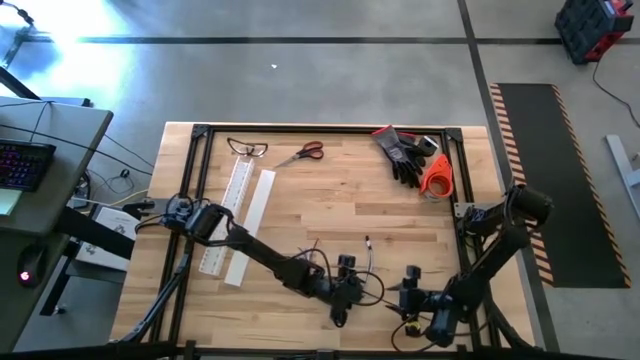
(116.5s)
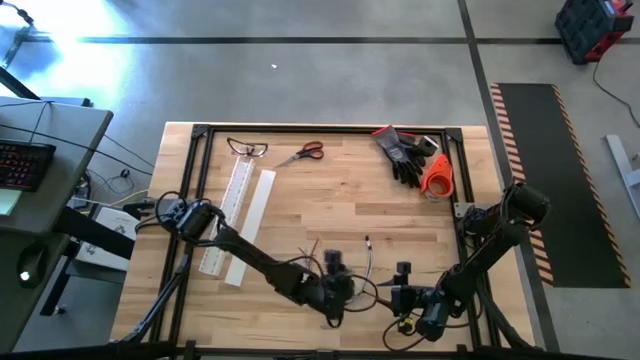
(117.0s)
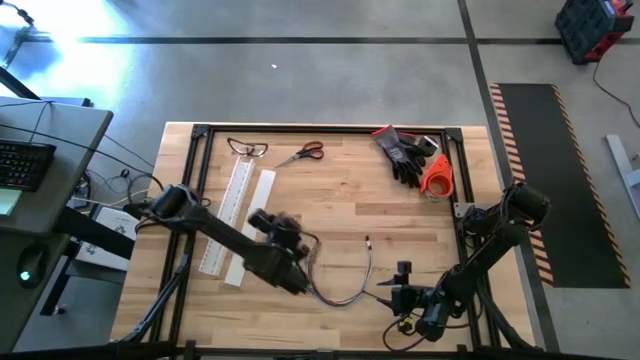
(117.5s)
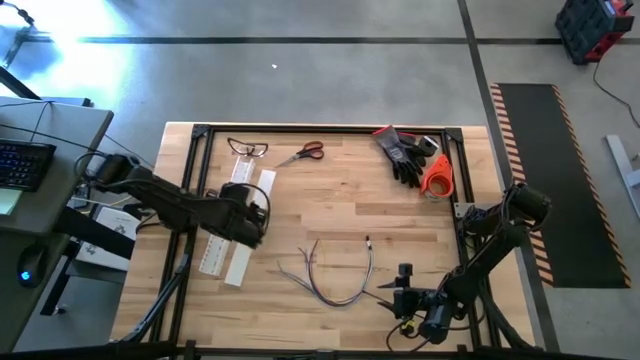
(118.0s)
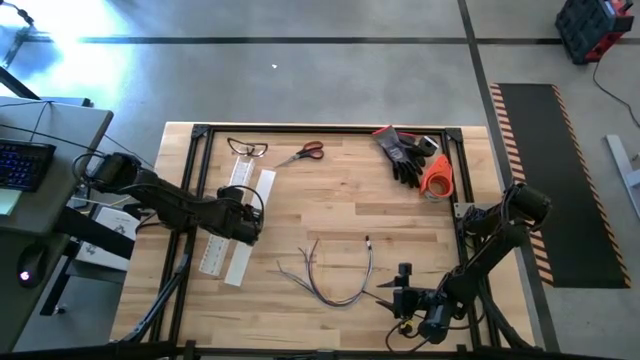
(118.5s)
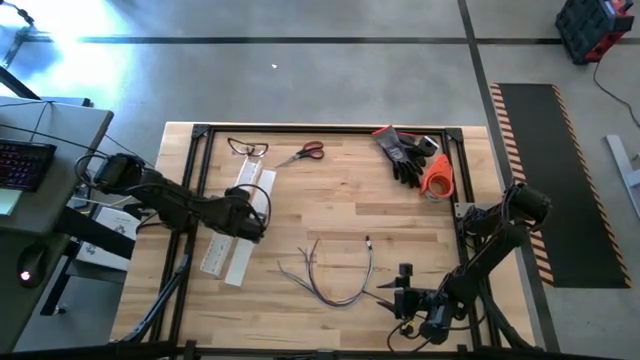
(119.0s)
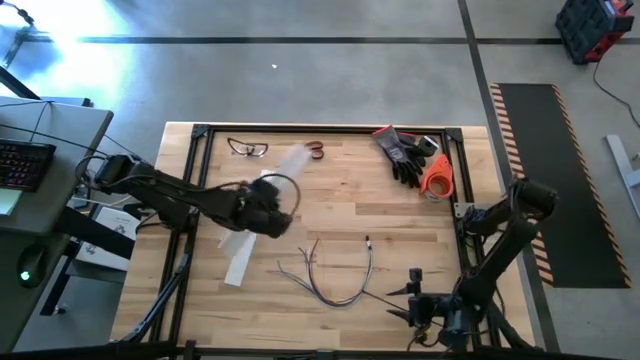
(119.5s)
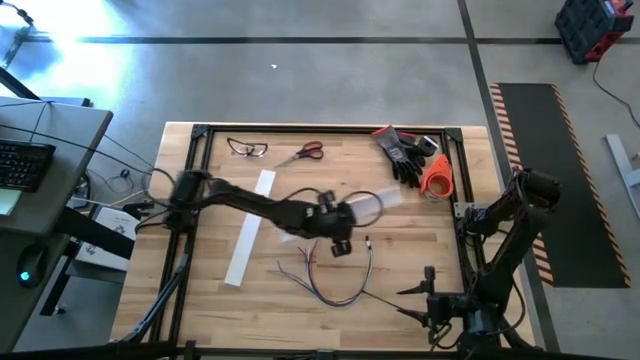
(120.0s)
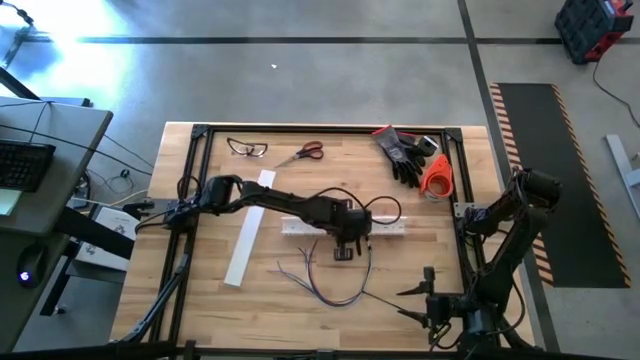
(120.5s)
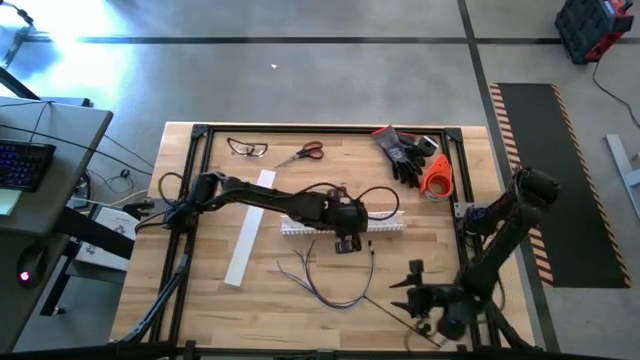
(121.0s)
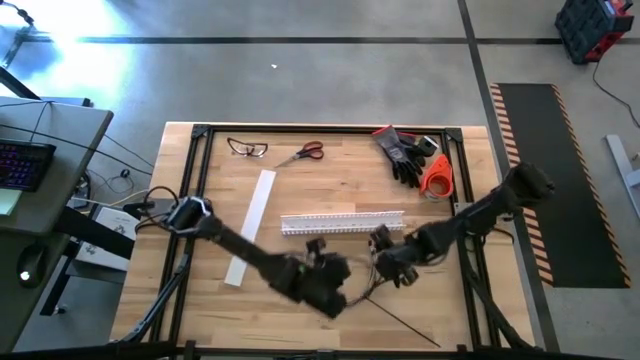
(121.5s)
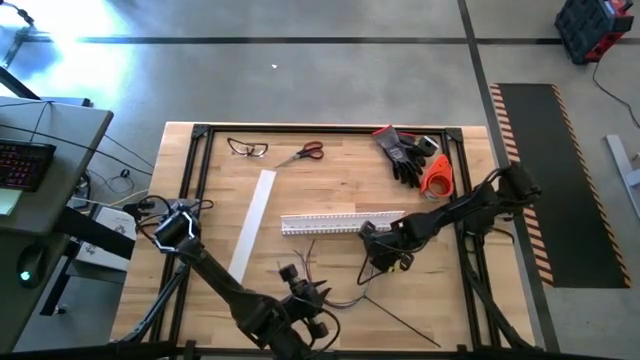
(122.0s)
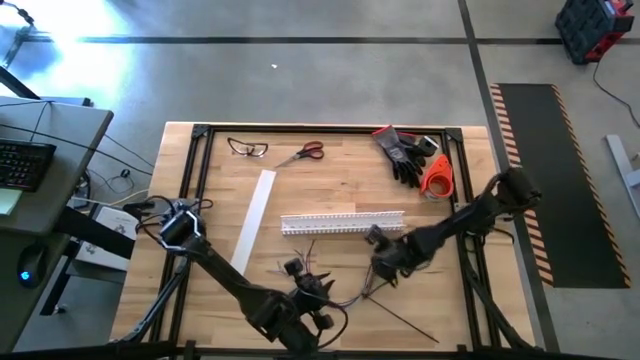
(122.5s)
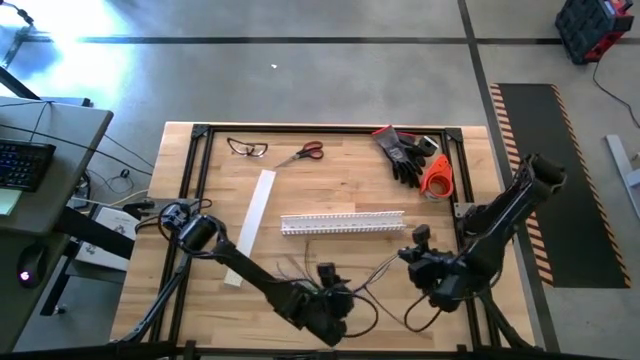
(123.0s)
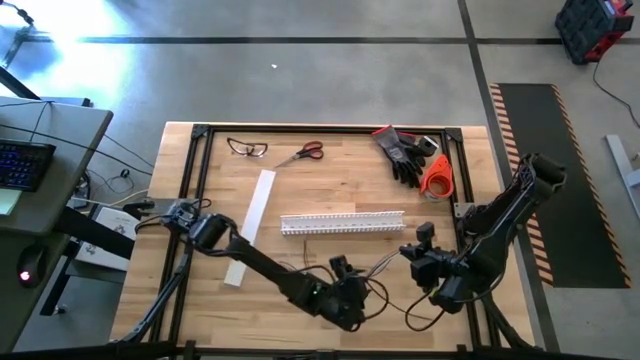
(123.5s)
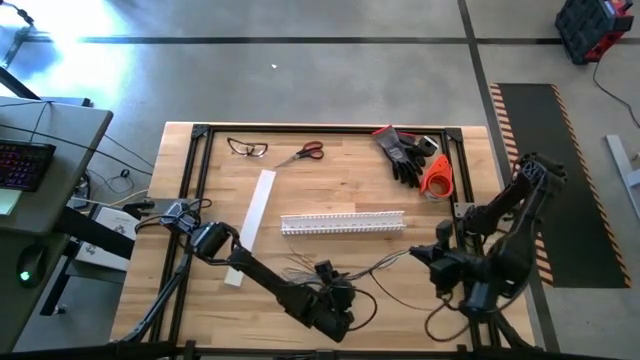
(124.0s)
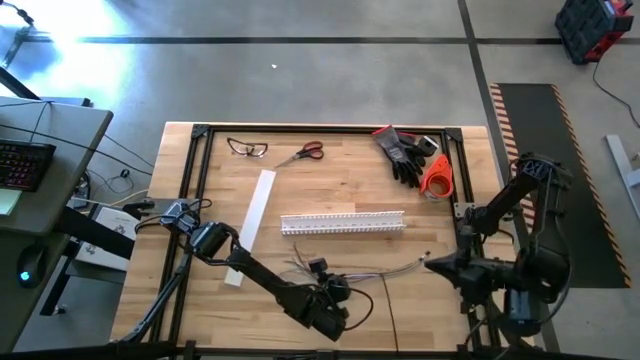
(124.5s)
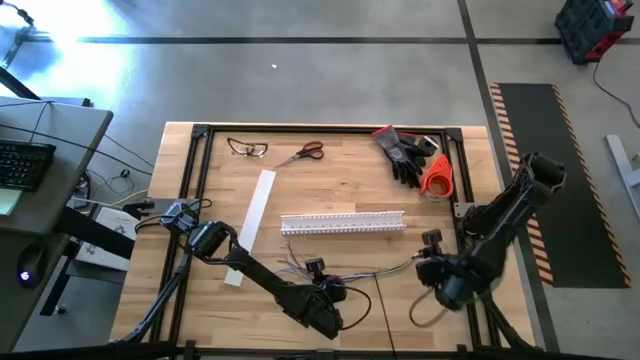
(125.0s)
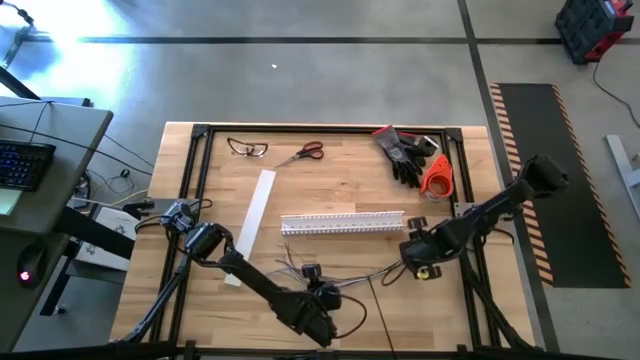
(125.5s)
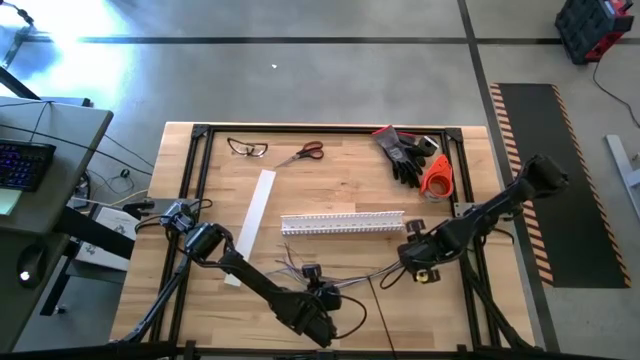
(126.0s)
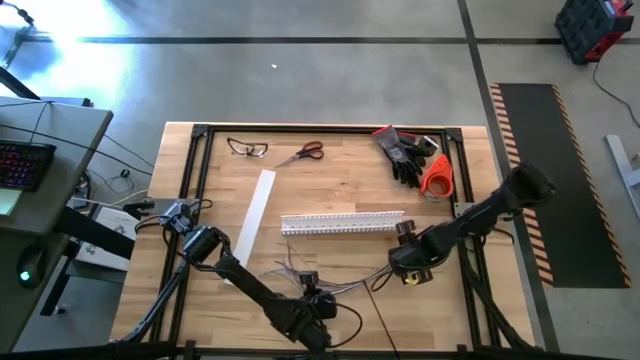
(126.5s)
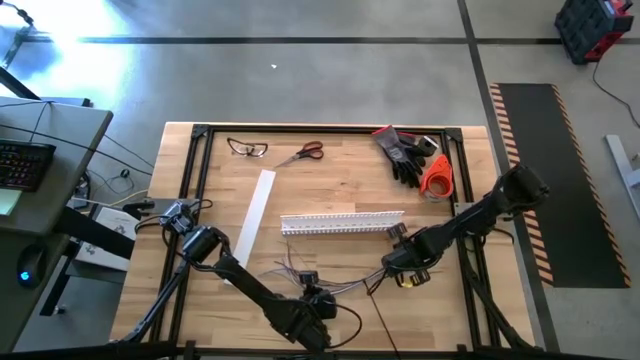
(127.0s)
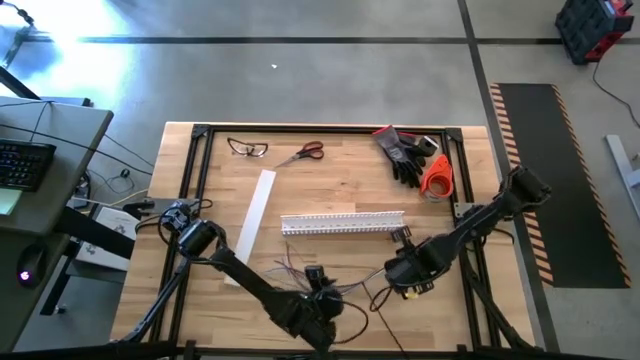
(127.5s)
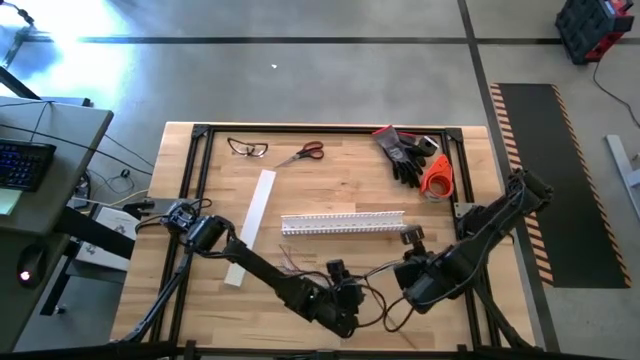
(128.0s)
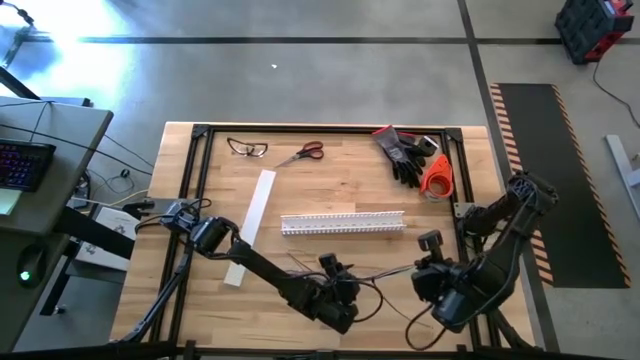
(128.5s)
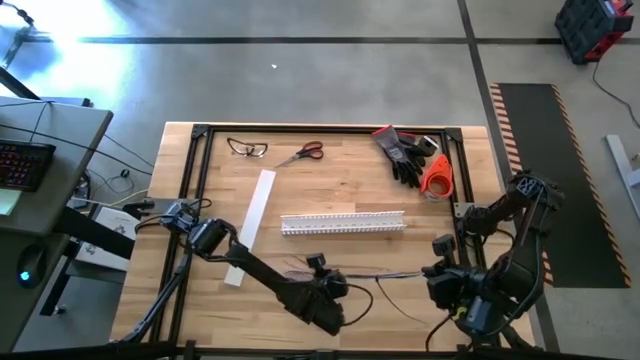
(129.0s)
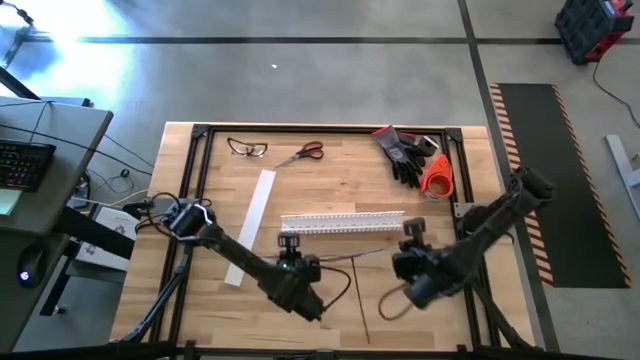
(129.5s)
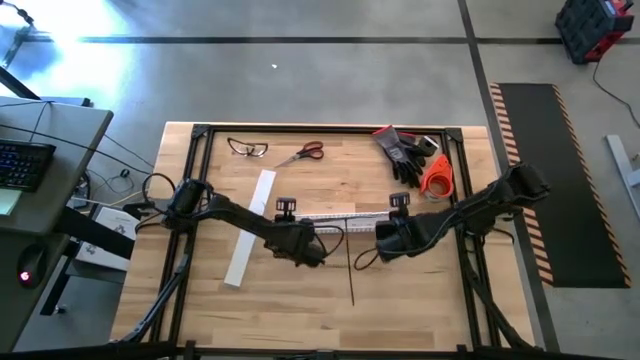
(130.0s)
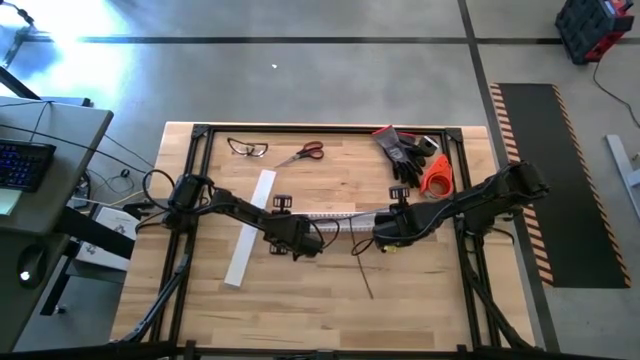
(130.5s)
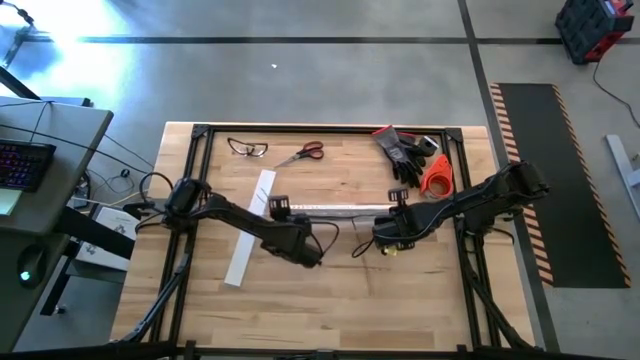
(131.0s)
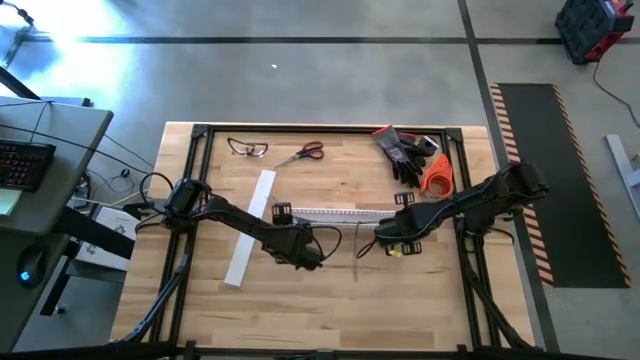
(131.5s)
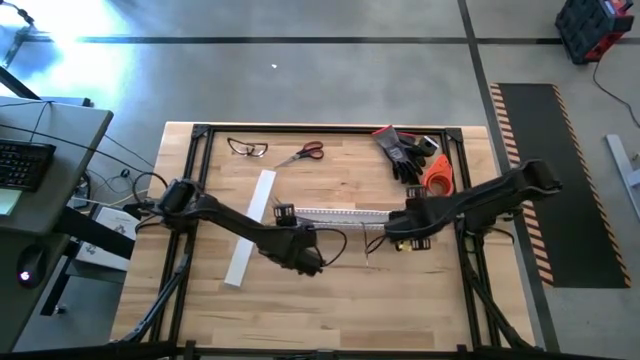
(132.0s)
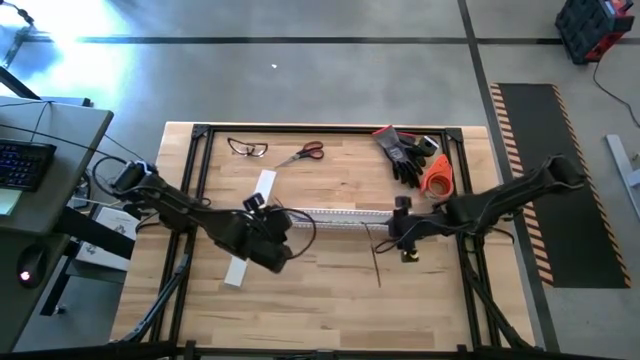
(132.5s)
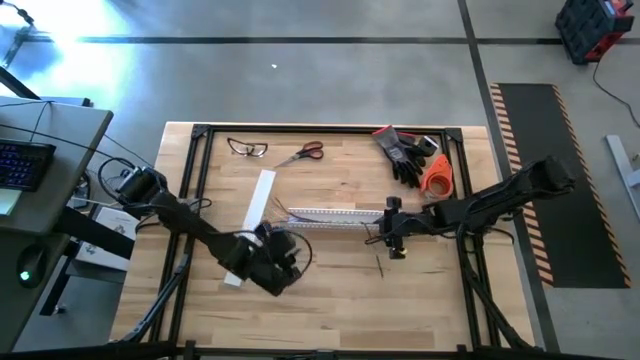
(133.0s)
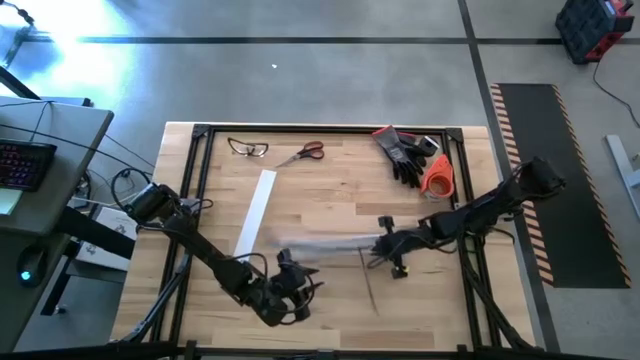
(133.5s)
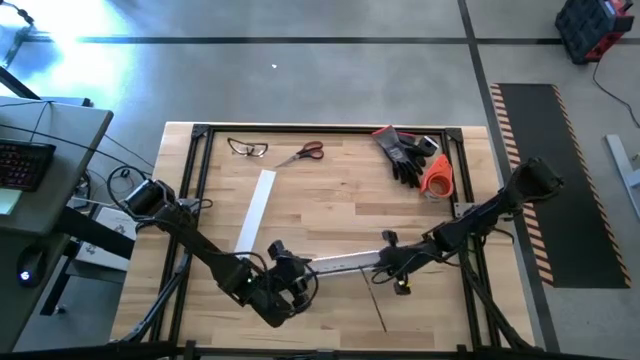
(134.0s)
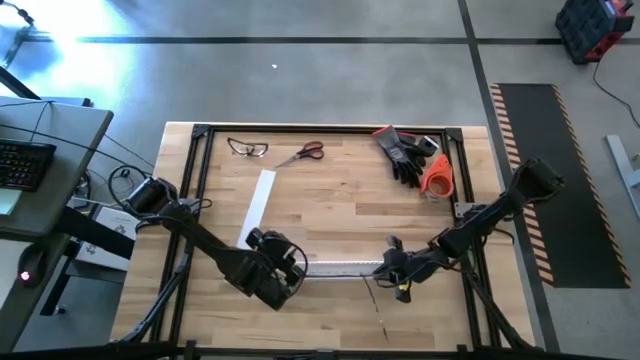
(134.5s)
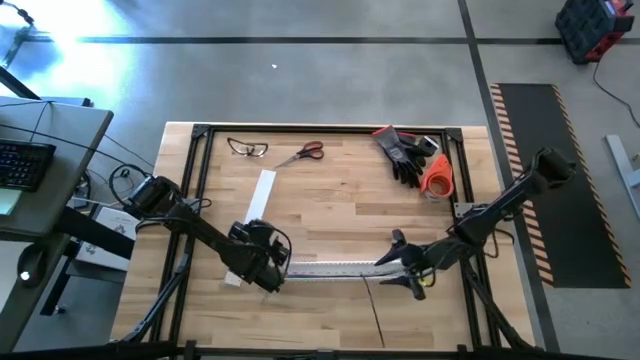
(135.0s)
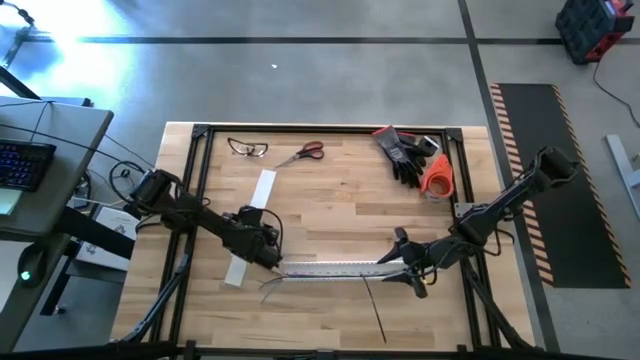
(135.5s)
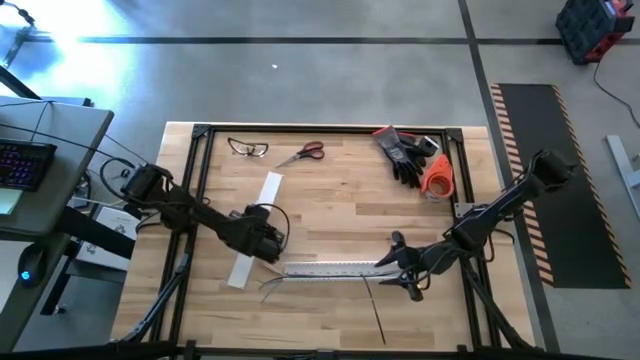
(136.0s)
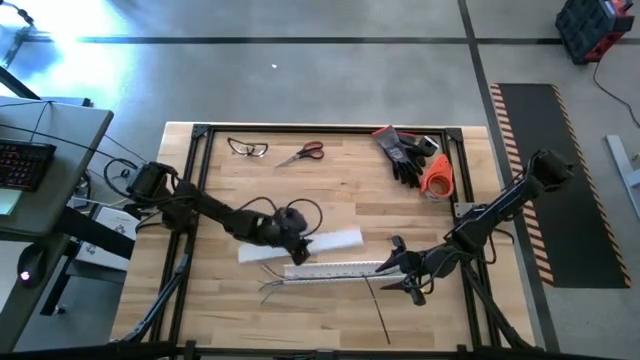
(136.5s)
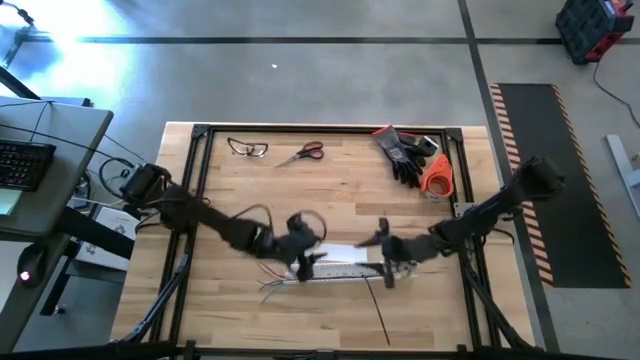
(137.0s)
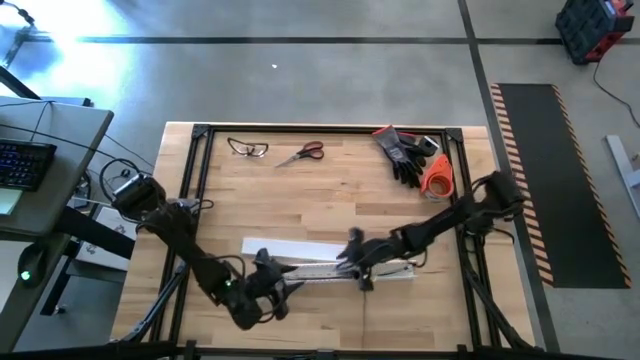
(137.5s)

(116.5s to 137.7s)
Task: Ziptie cables
Put the zip-tied cable into the white cable duct

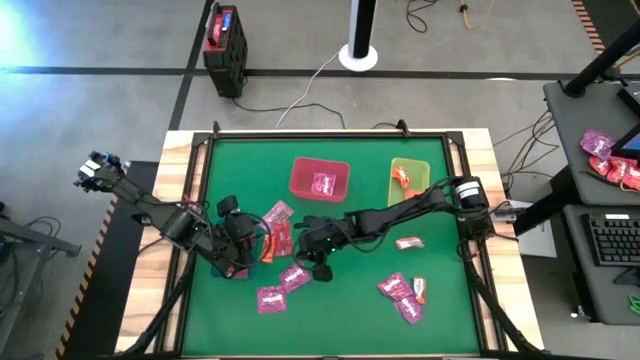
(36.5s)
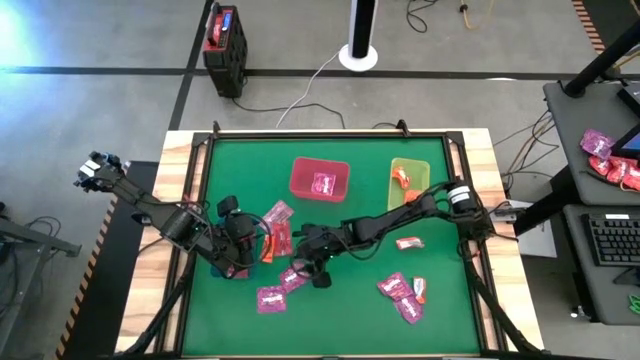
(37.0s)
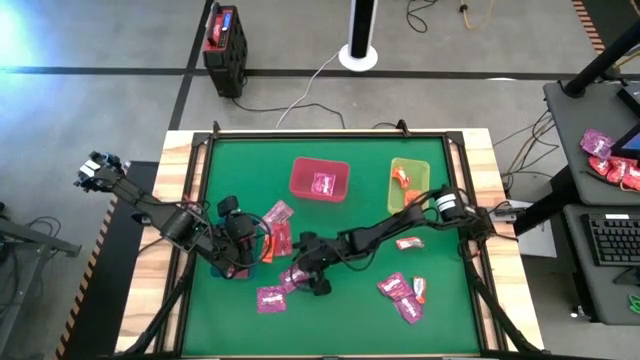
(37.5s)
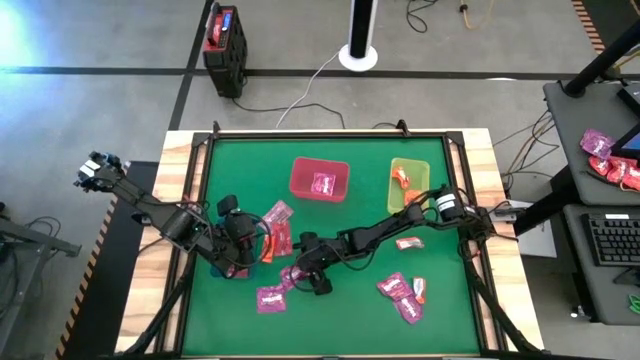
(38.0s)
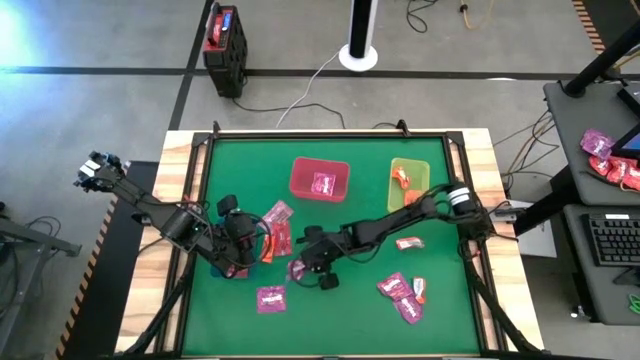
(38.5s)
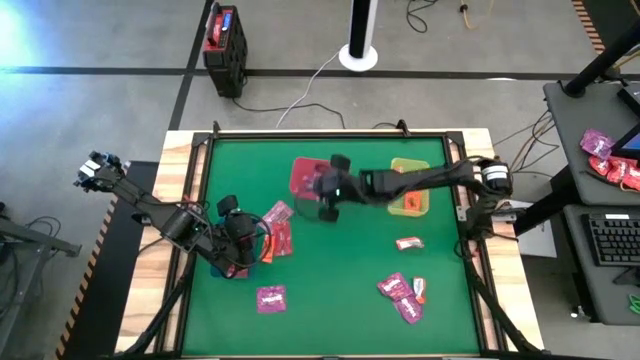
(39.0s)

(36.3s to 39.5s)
Task: Sort candy by brand, put in halloween buckets
Put the violet candy into the red bin
